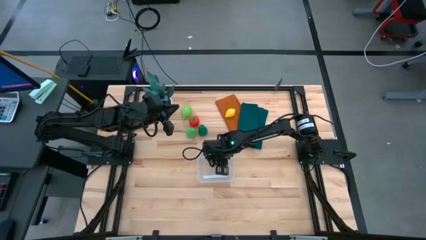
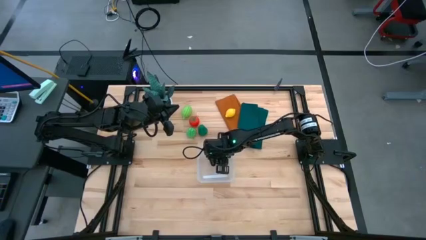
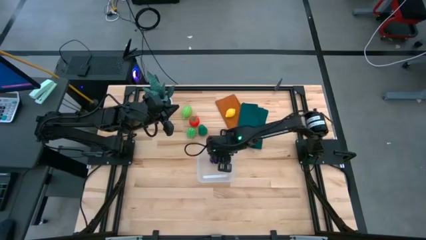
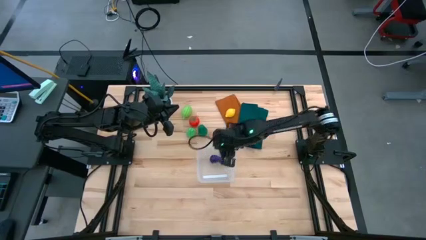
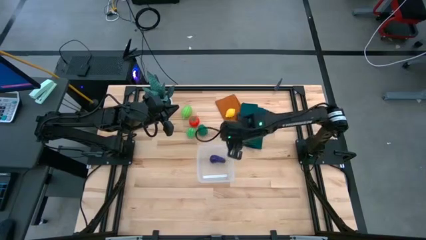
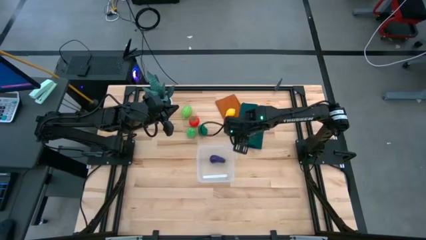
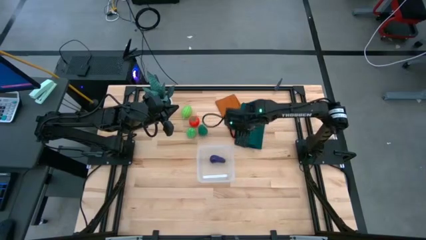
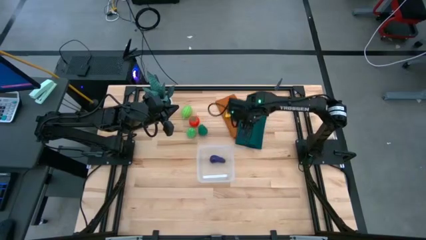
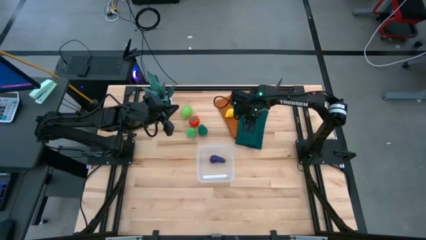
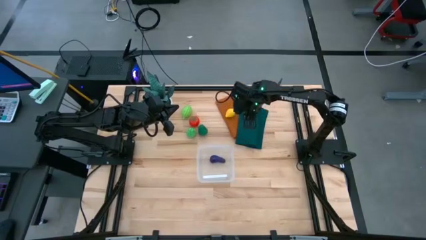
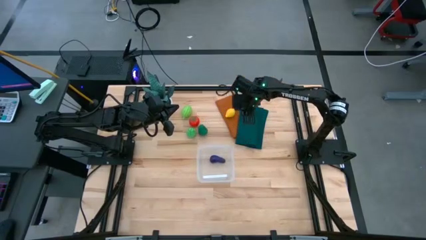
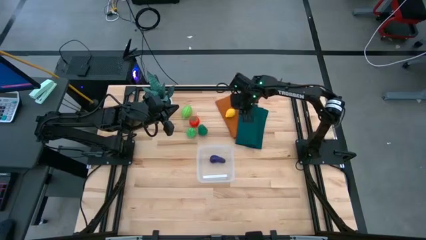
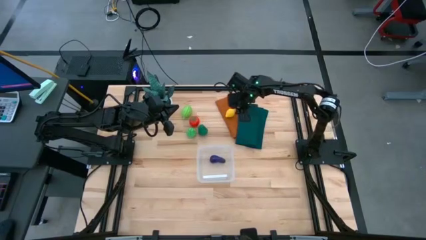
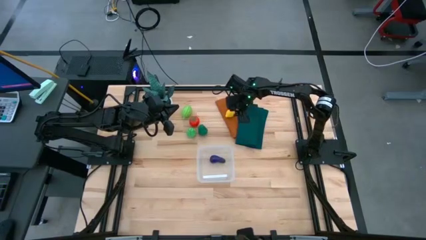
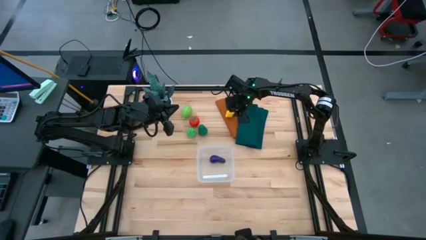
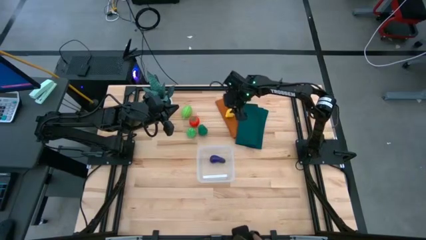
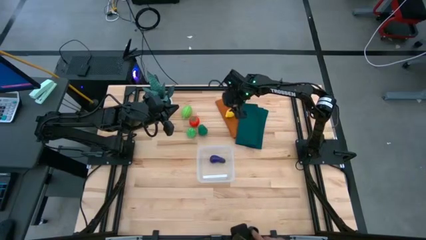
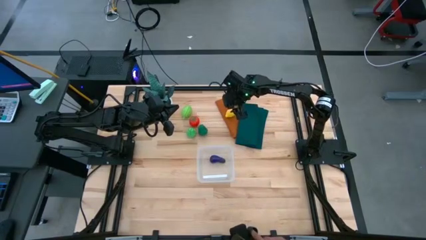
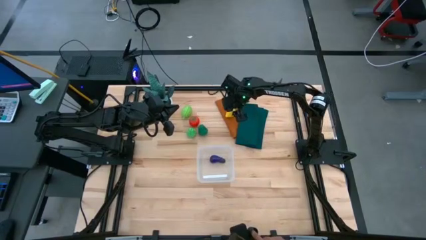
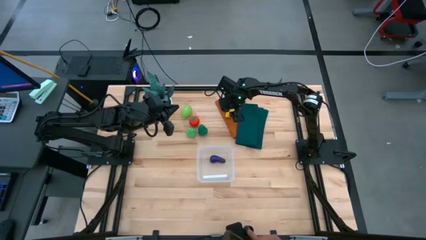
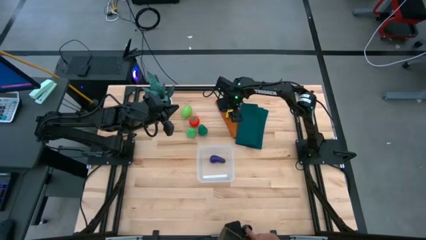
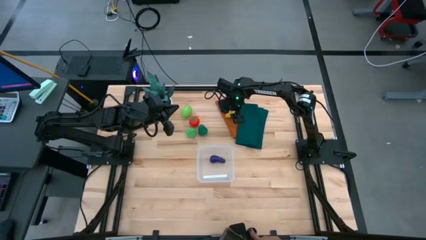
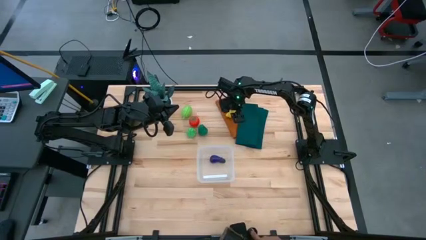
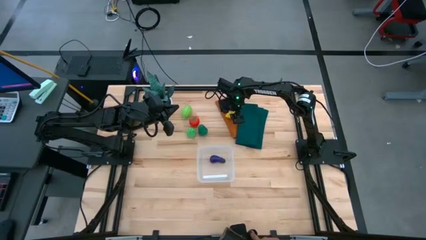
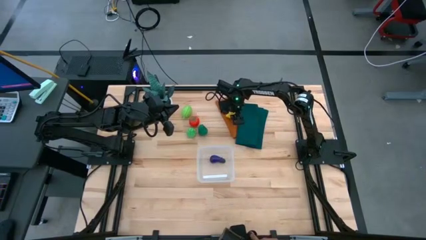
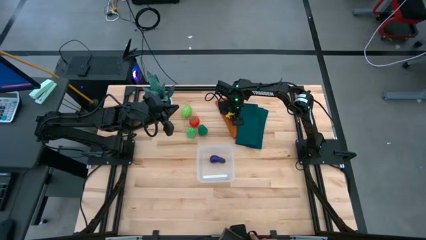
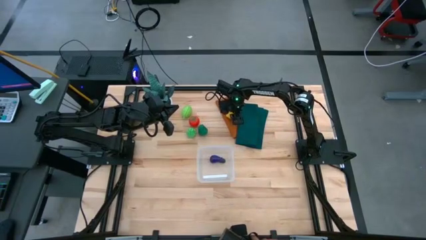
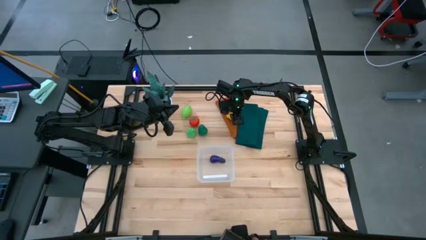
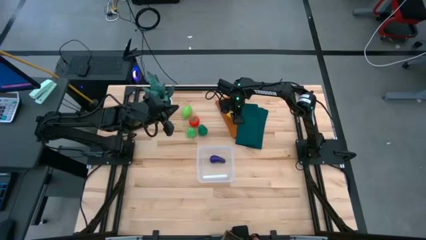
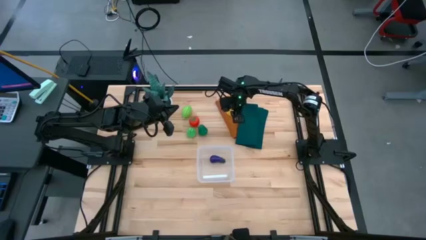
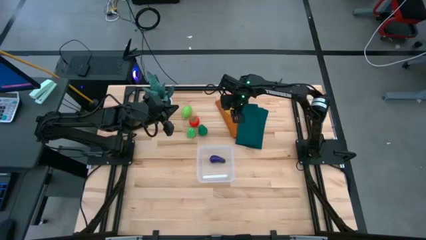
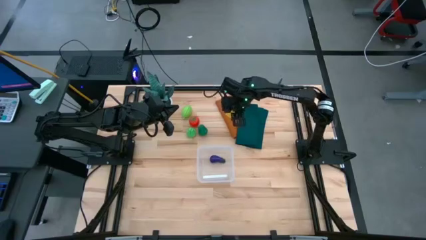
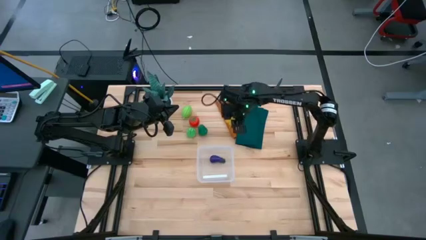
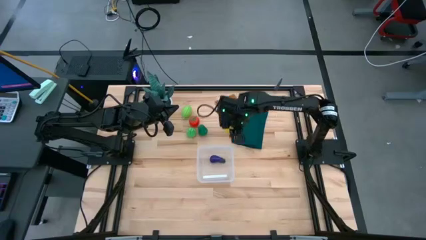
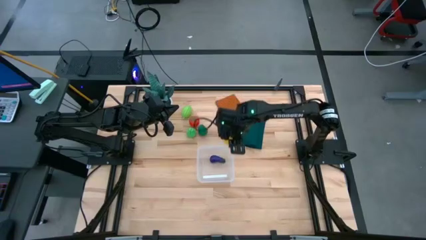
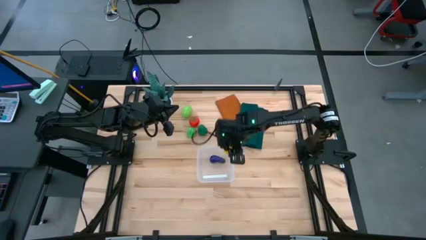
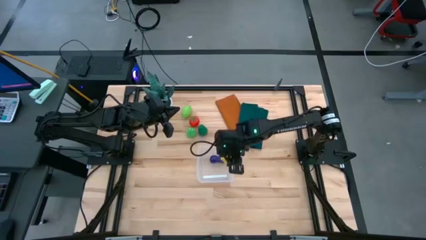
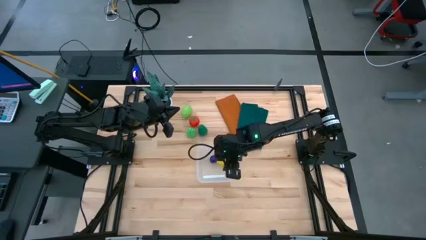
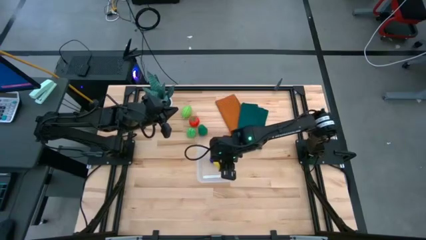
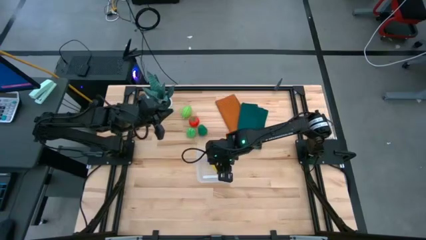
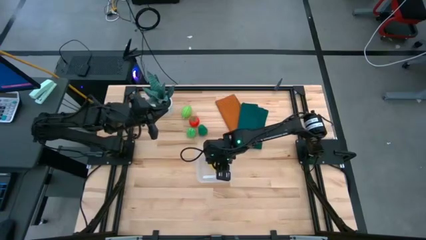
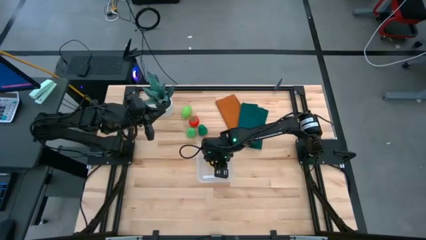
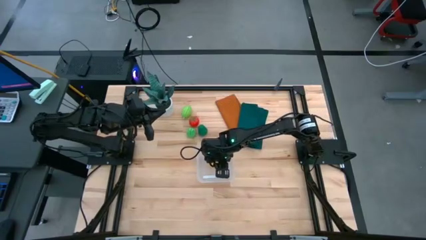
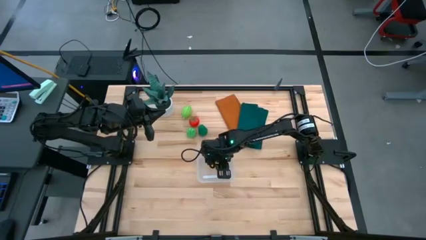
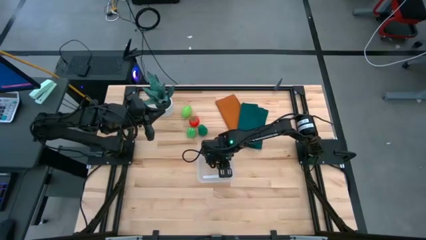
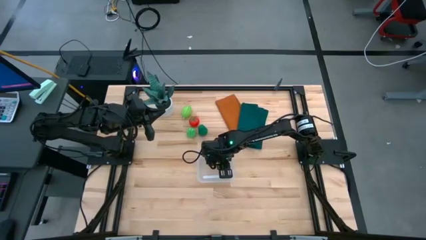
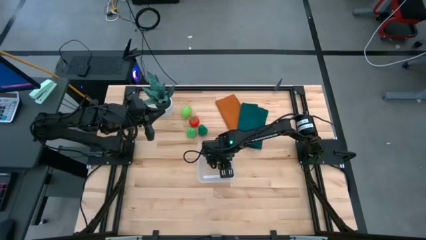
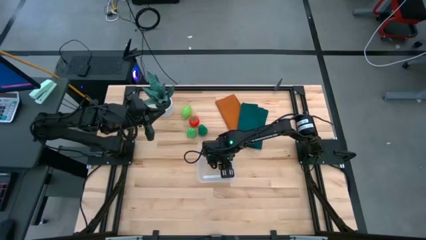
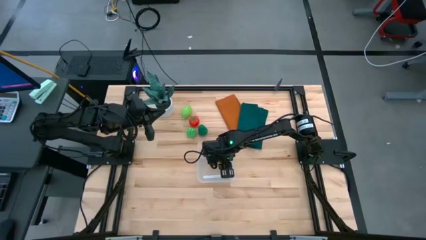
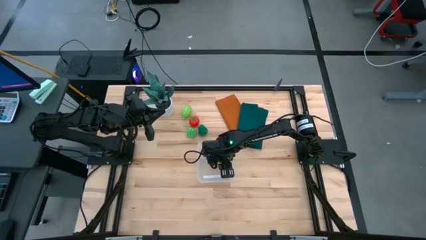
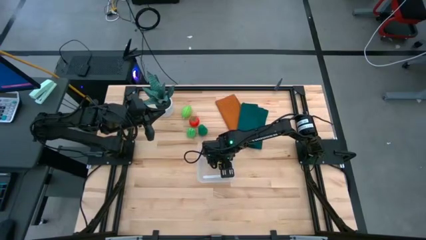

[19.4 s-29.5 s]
Task: Pick and placing Produce into tupperware
Put the yellow lemon into the transparent container

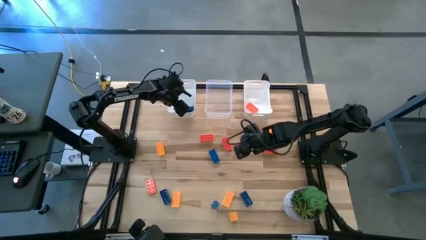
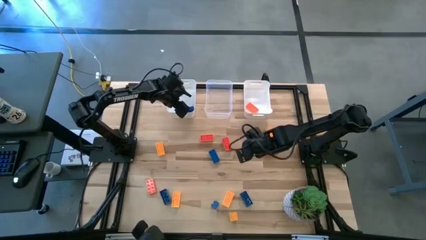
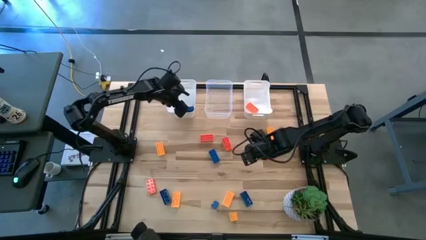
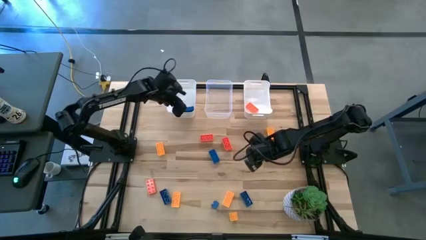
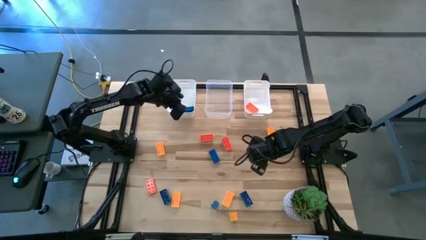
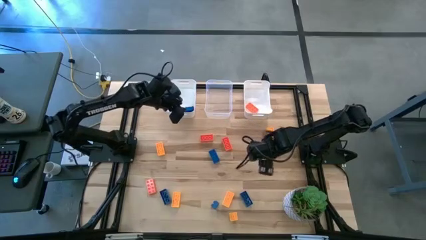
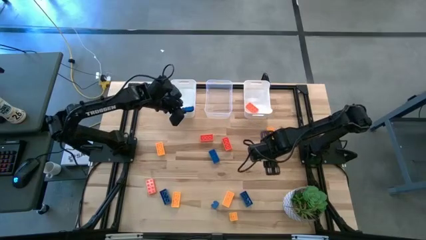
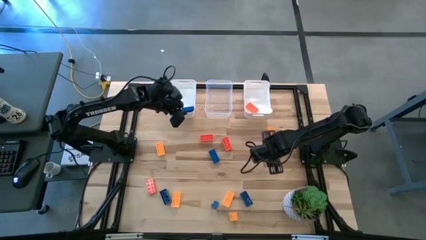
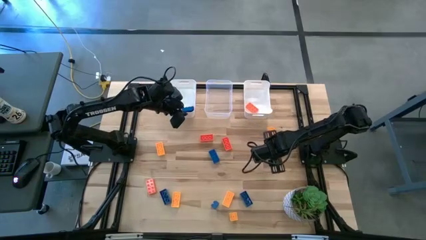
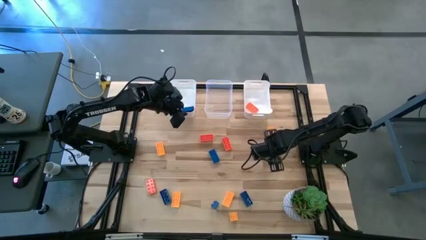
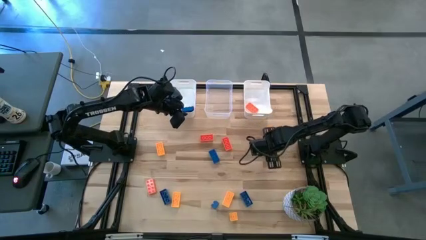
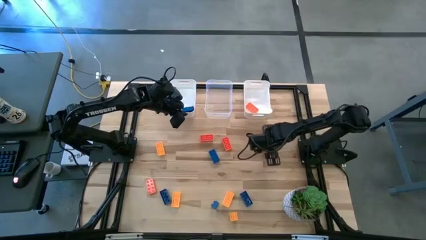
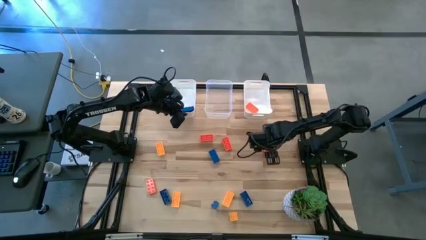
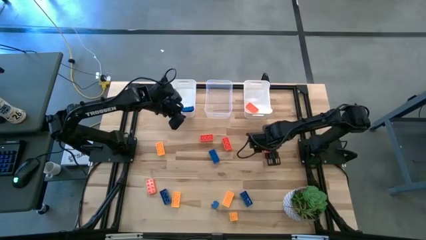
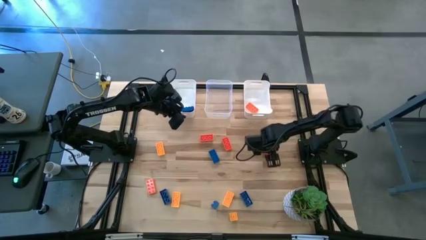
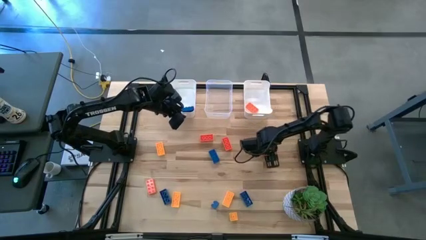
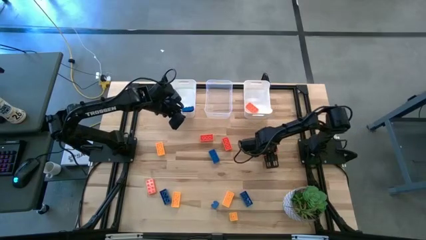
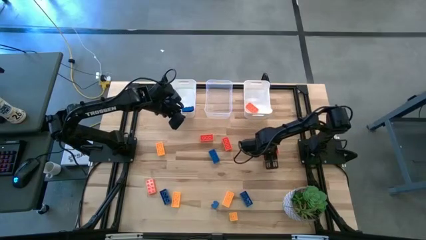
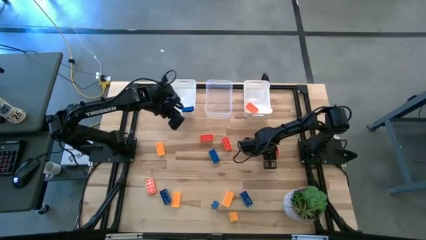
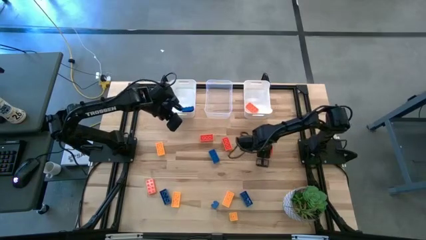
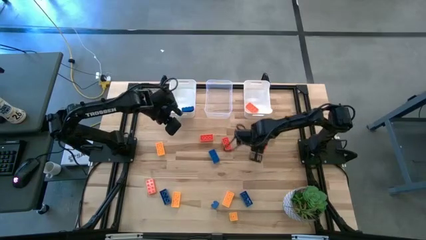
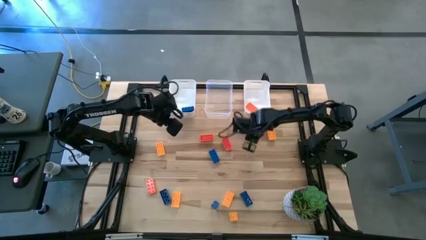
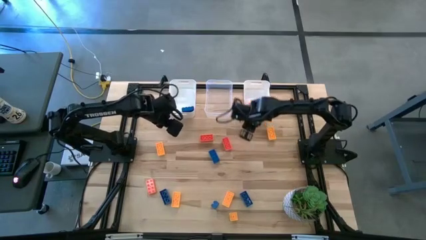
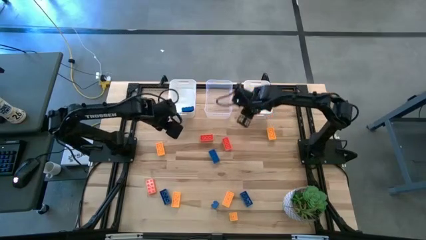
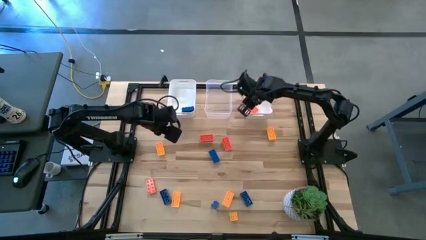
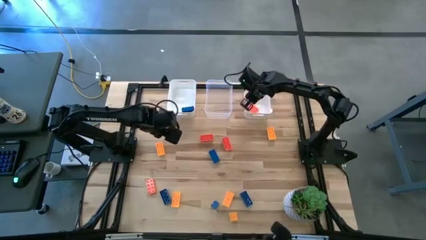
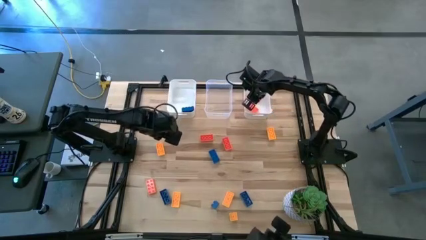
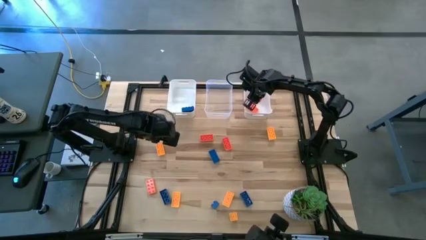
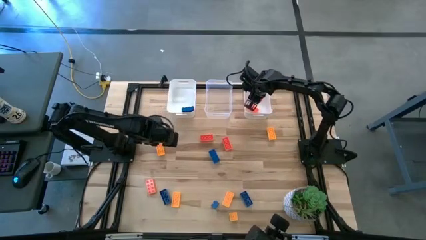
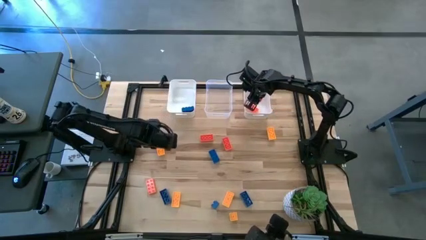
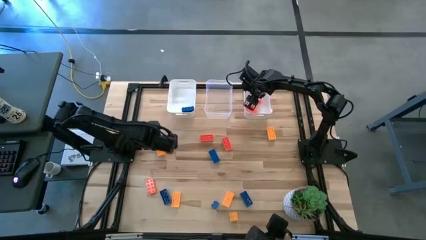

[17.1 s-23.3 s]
Task: Sort & place blocks by color
Put the orange game piece into the right white bin
